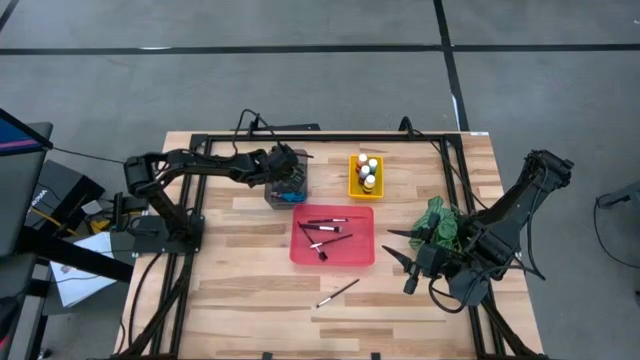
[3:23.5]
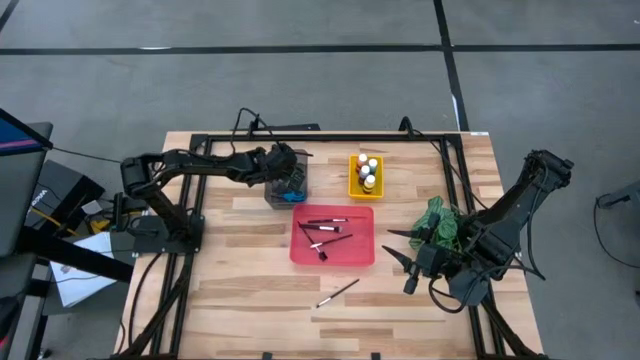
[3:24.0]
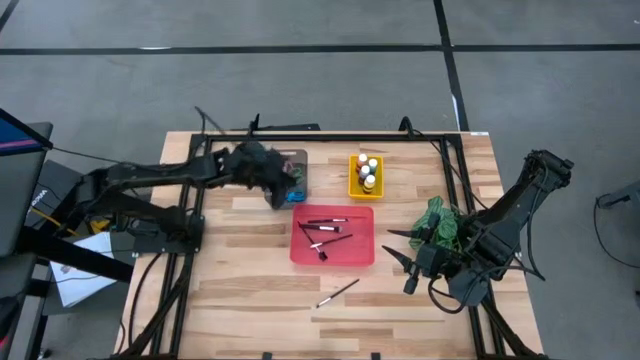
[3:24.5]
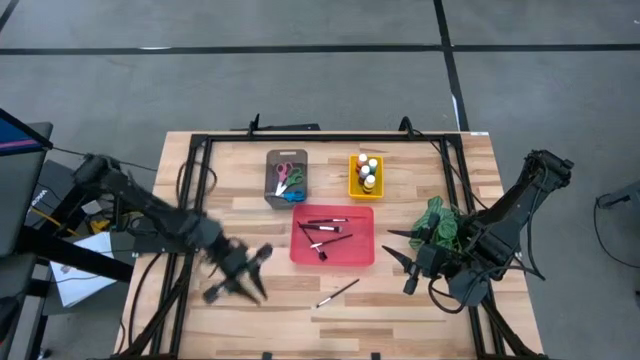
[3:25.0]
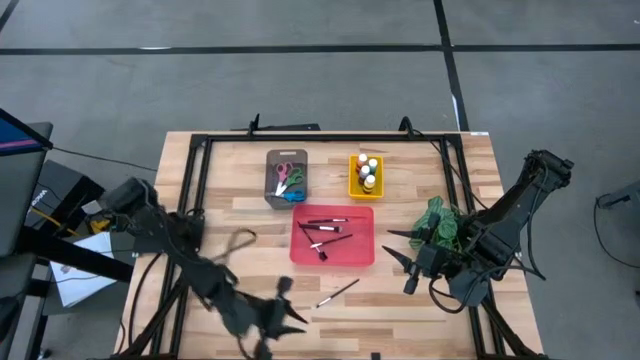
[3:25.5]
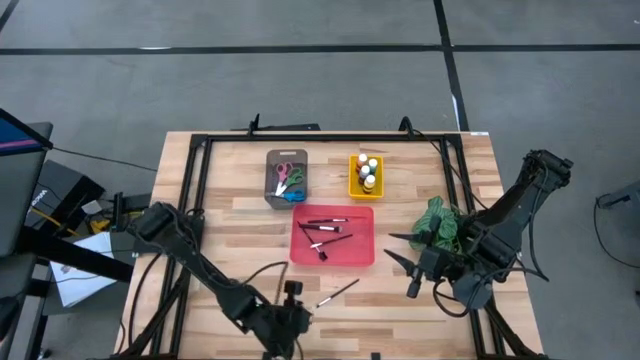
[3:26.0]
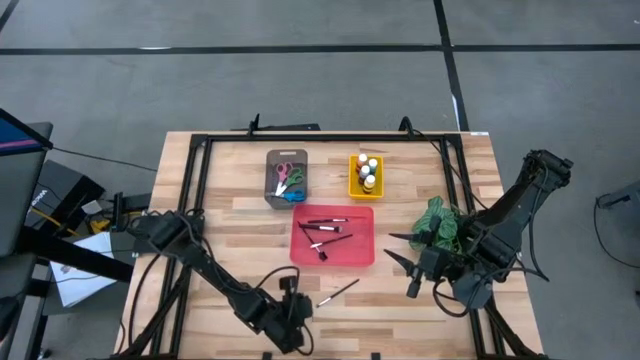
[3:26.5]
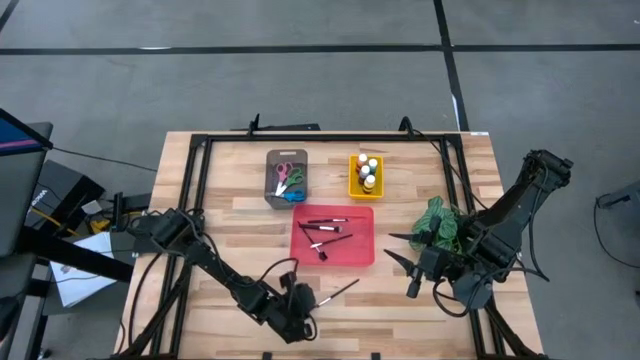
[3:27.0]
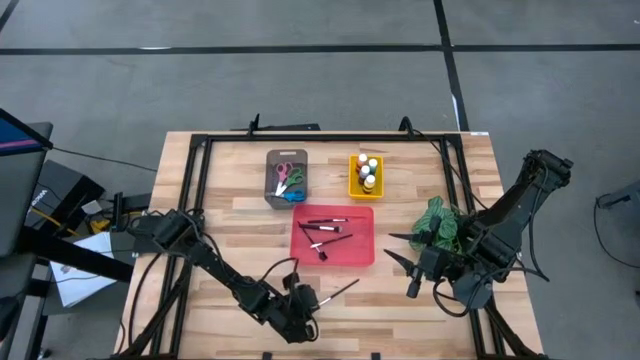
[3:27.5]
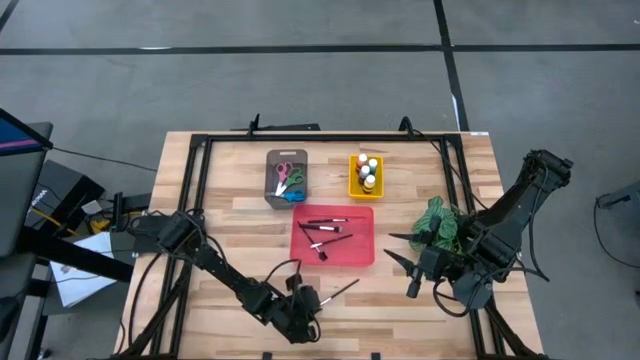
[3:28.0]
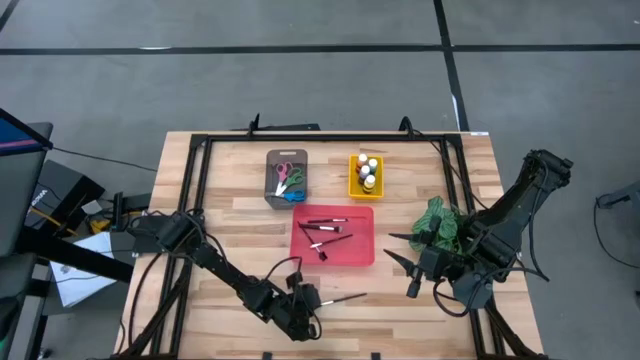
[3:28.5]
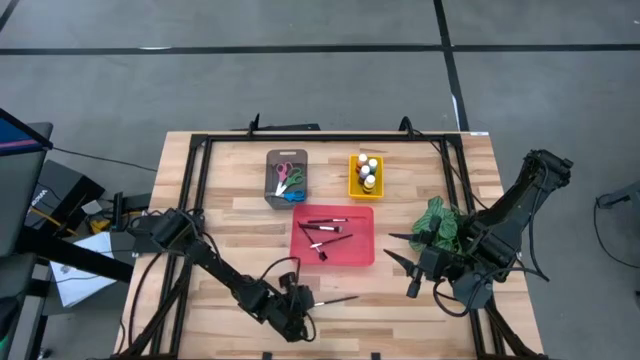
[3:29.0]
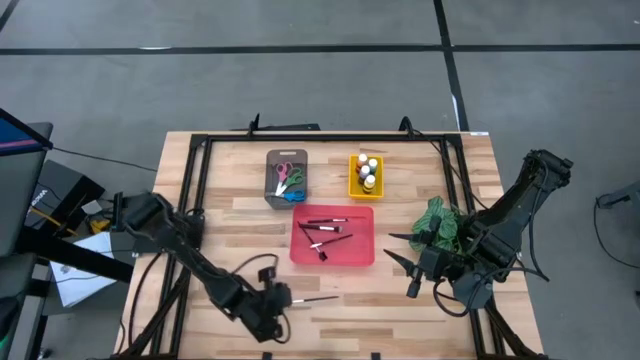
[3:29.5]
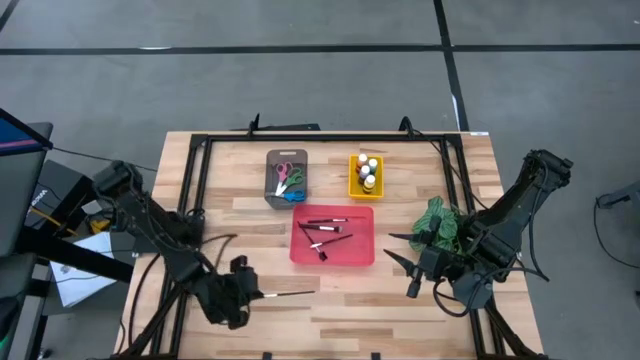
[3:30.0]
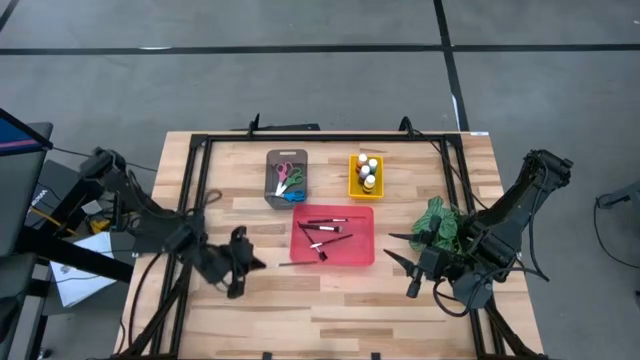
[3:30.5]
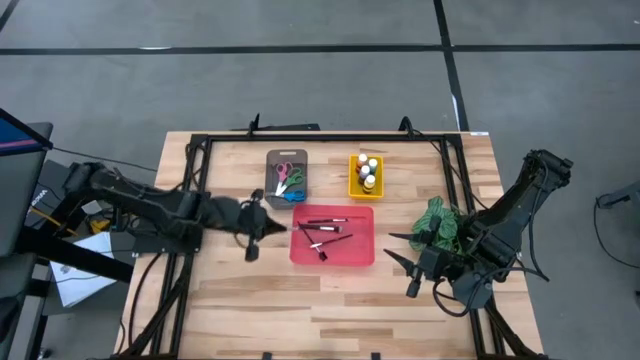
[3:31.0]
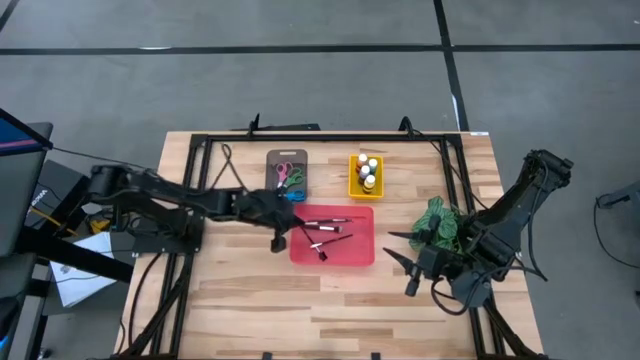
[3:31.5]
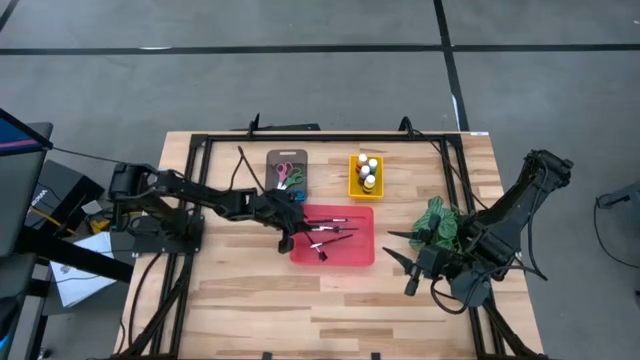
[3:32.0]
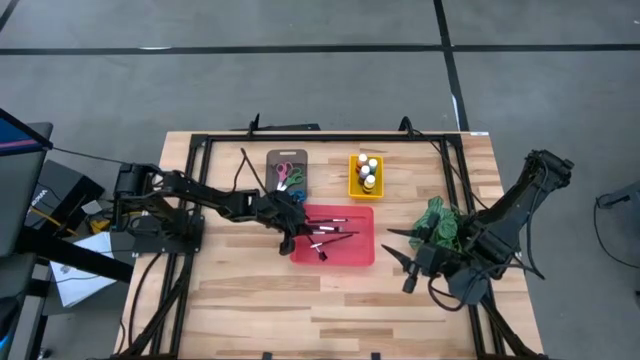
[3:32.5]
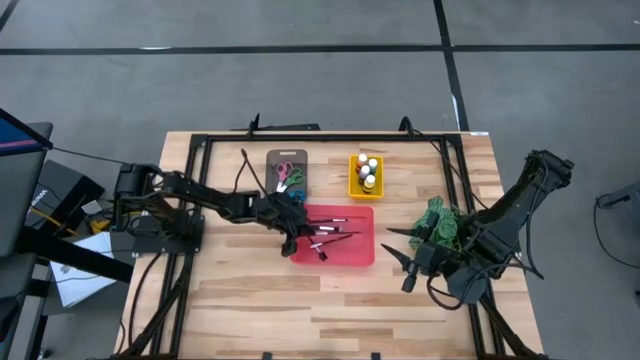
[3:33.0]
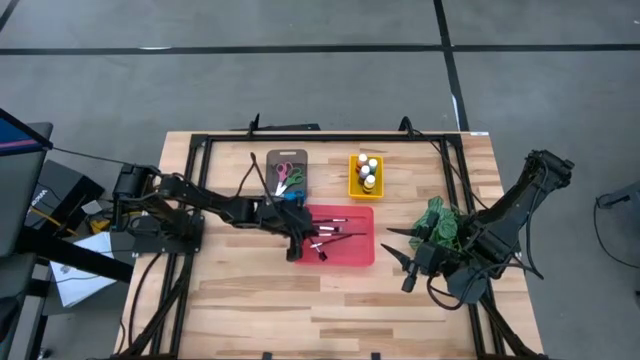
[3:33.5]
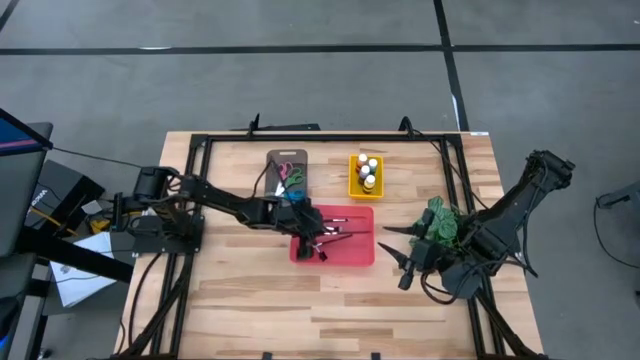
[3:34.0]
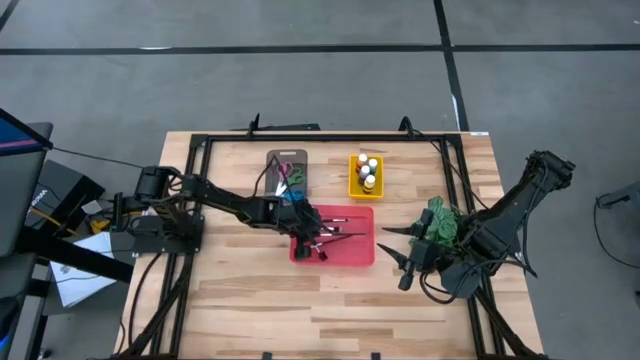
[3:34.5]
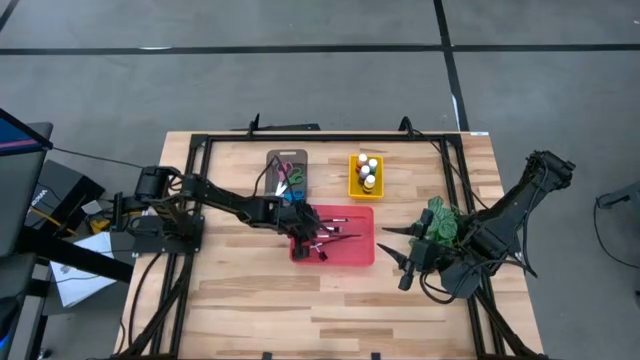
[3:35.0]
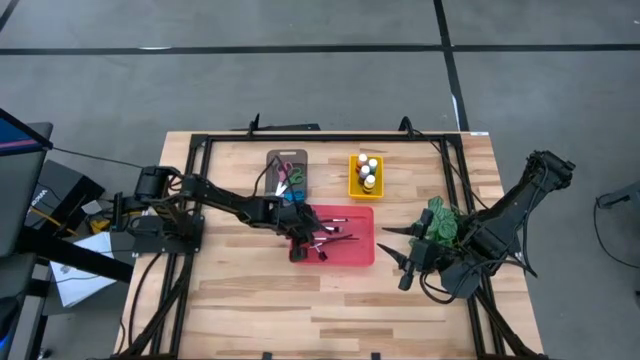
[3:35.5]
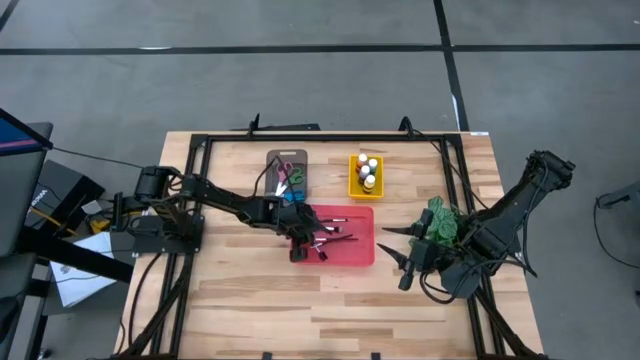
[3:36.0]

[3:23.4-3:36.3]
Task: Pick & Place Paint Supplies
Put the black makeup brush into the red bin

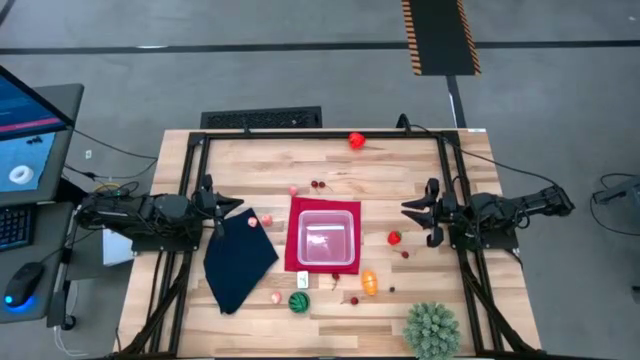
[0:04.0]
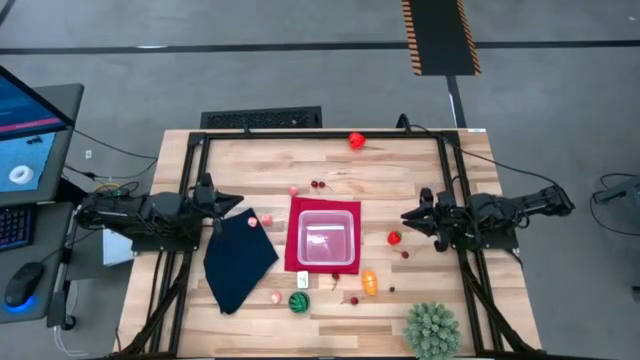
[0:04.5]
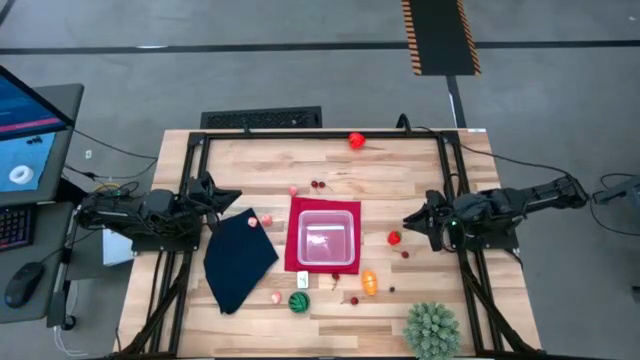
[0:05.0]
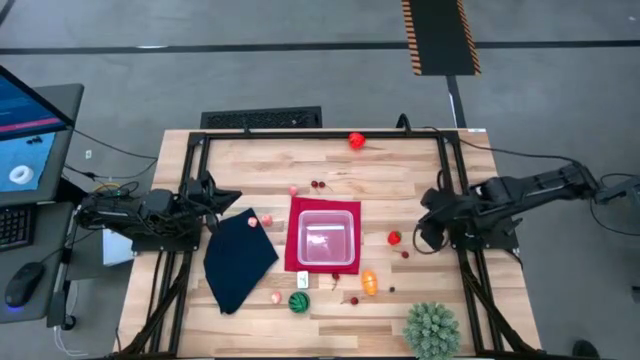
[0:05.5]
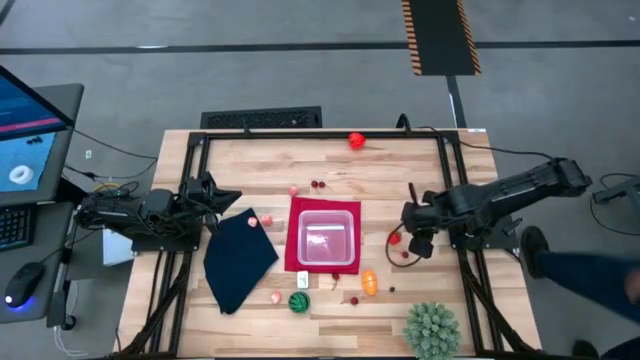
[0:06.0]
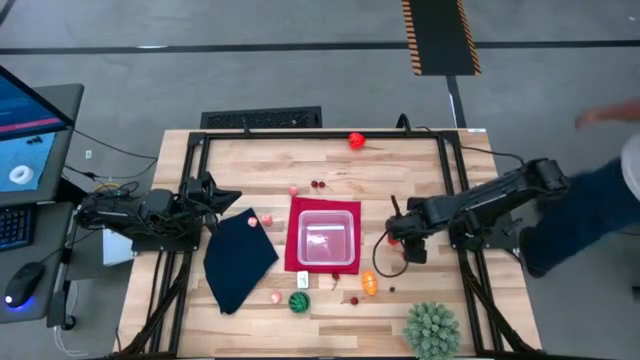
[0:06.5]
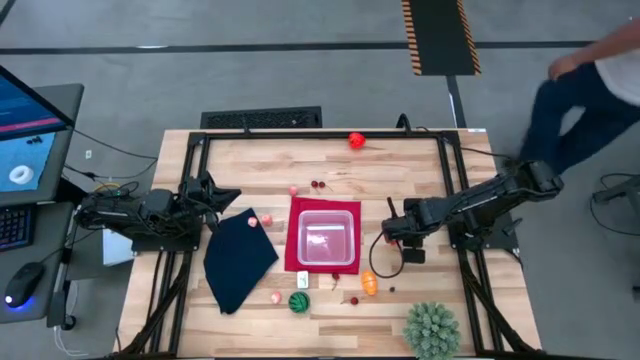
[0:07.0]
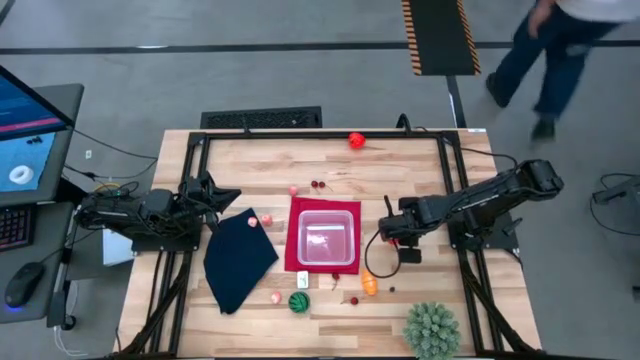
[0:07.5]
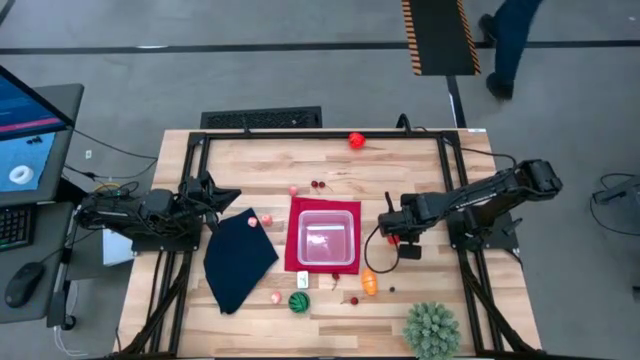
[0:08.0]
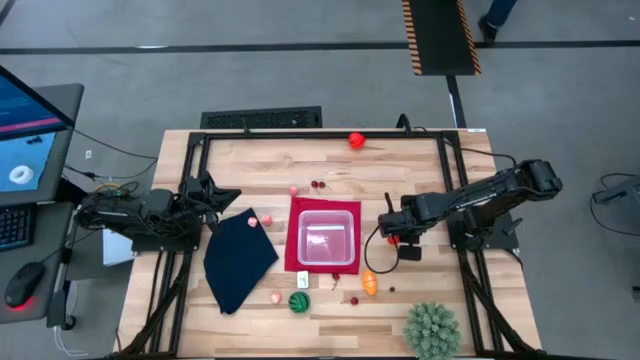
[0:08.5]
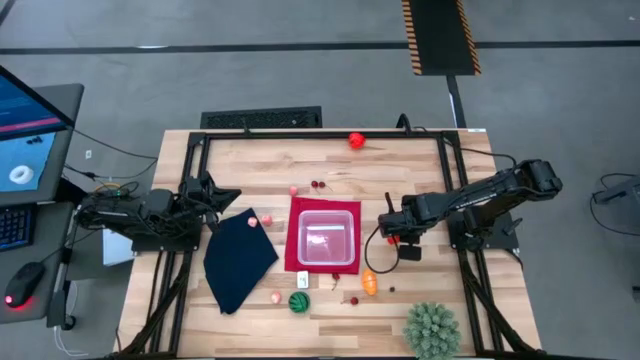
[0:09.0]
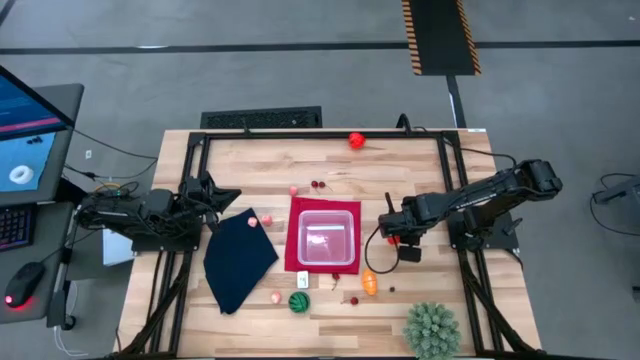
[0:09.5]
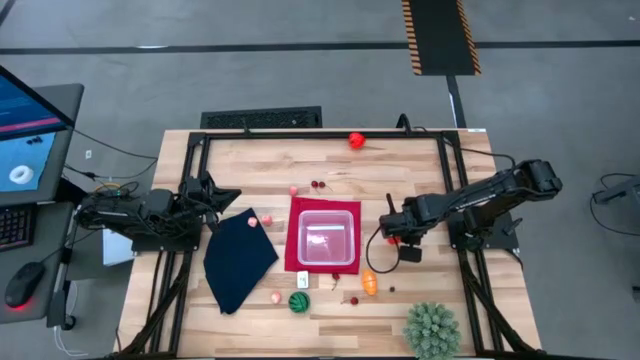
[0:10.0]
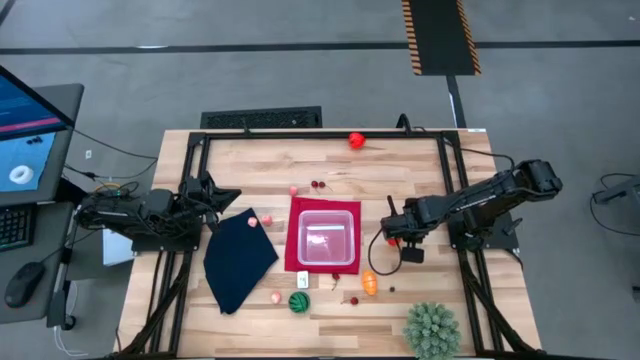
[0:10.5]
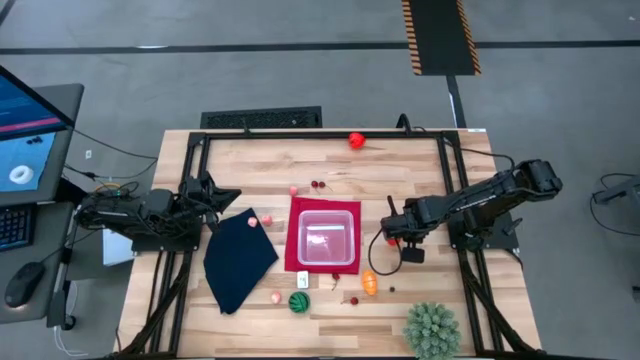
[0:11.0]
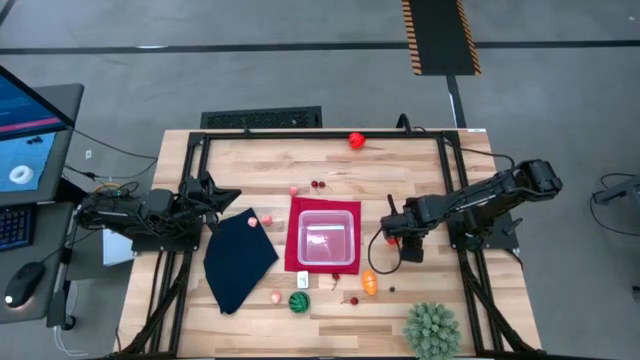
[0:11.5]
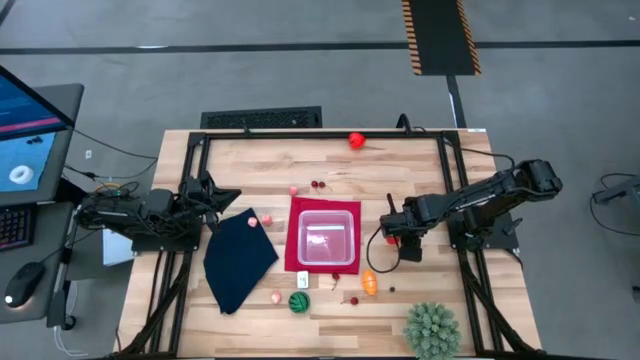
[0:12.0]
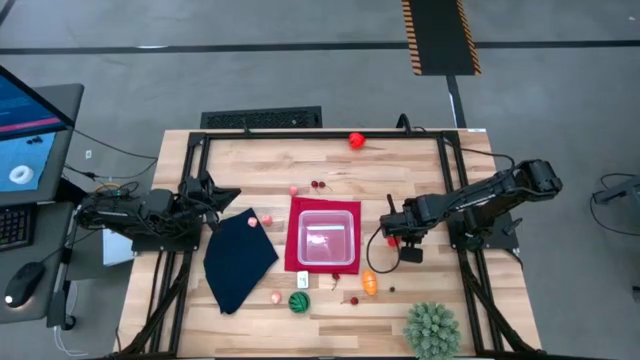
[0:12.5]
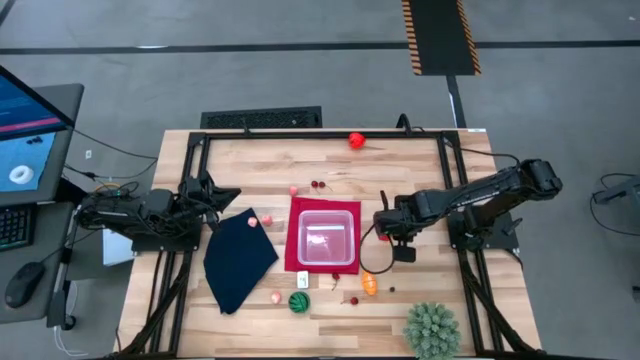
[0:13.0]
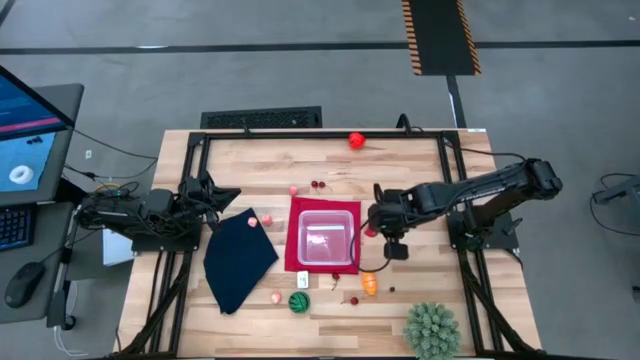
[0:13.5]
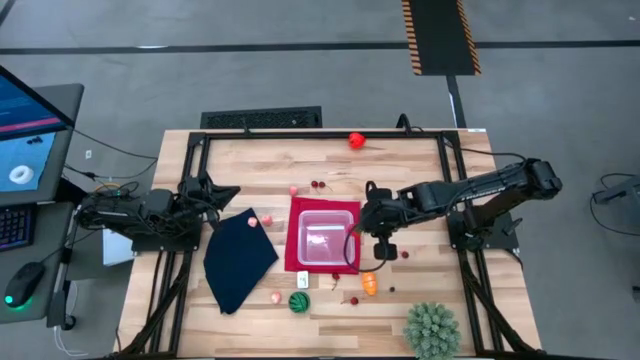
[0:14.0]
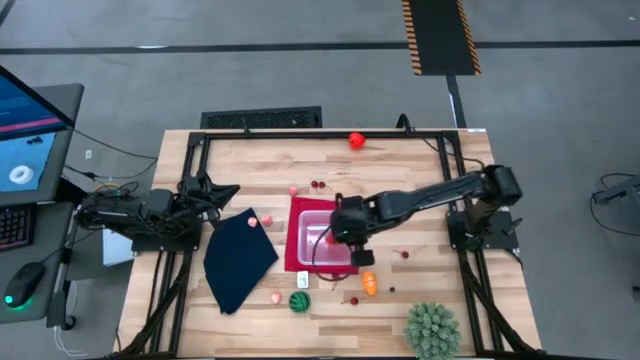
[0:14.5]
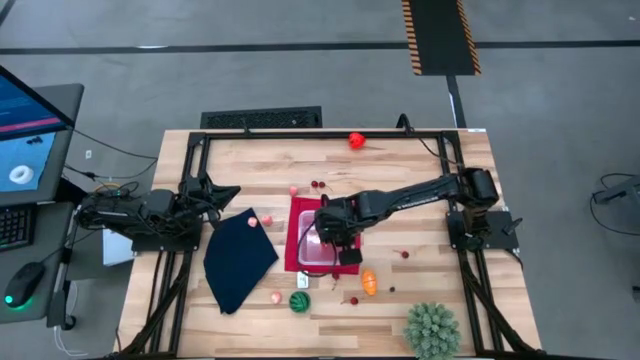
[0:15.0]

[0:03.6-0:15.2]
Task: Pick and placing Produce into tupperware
Put the strawberry in the transparent bin
